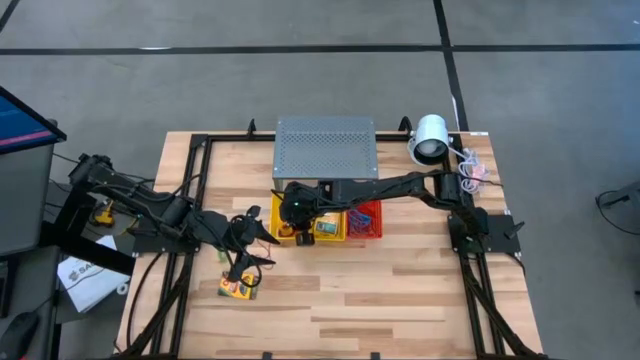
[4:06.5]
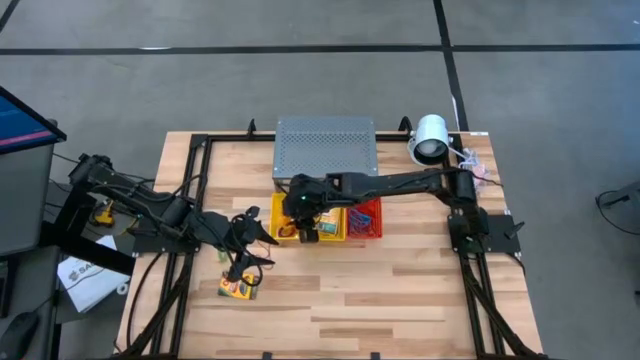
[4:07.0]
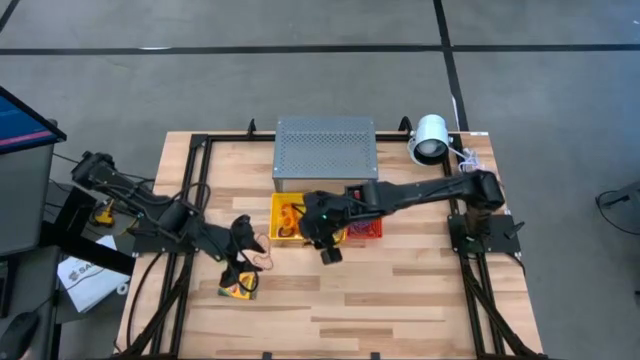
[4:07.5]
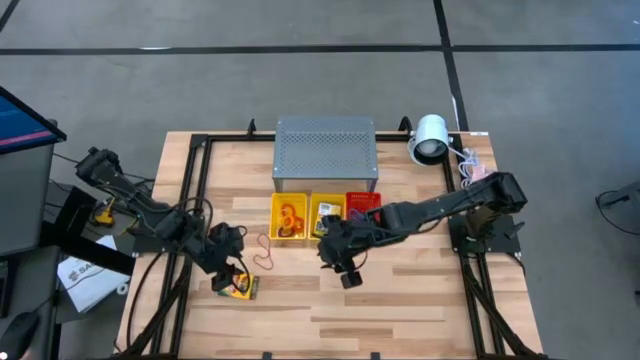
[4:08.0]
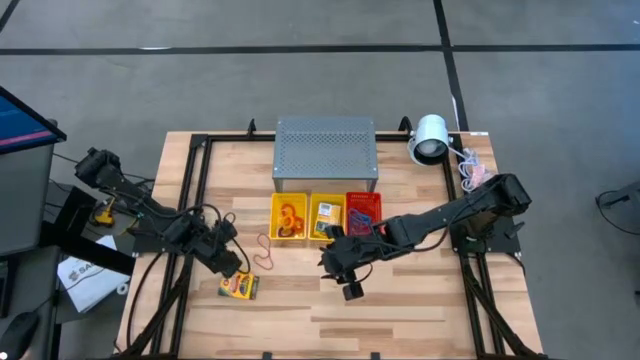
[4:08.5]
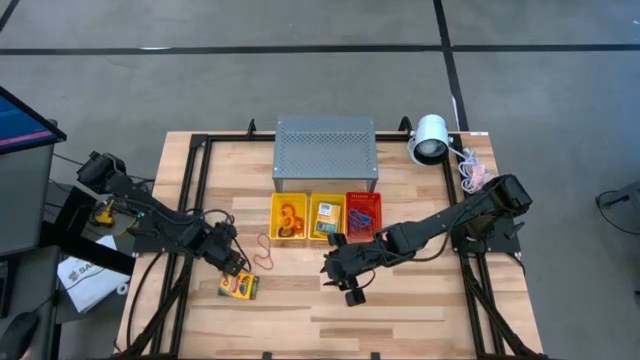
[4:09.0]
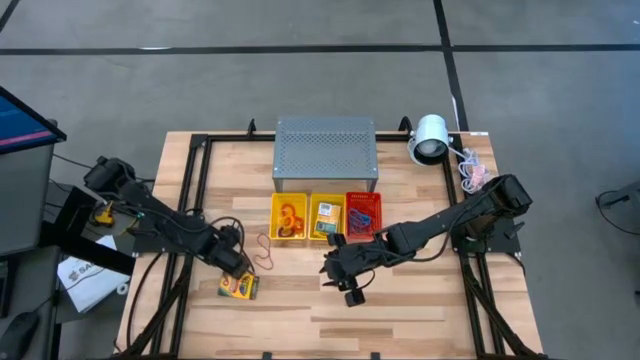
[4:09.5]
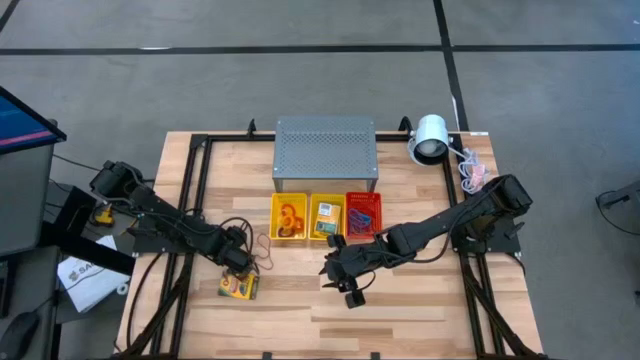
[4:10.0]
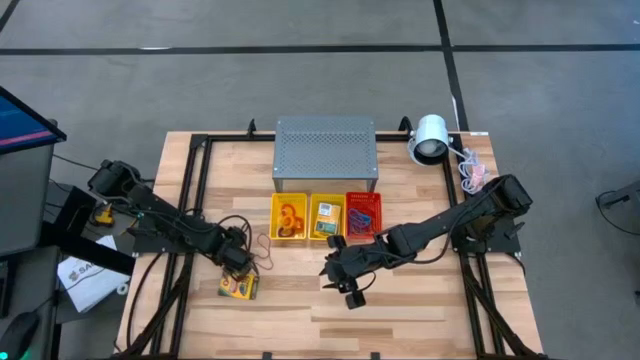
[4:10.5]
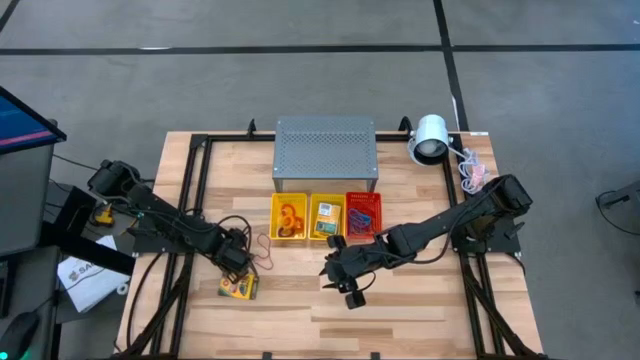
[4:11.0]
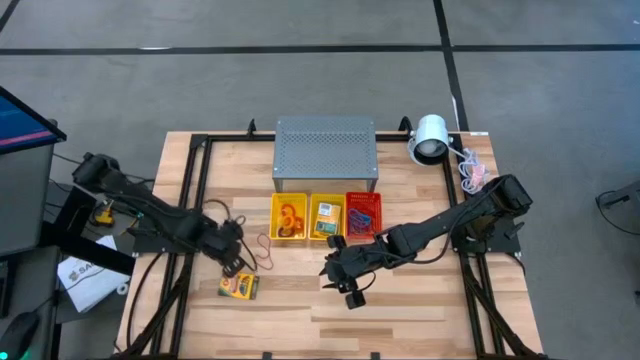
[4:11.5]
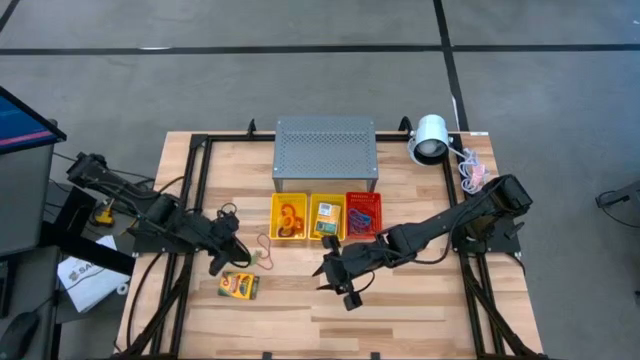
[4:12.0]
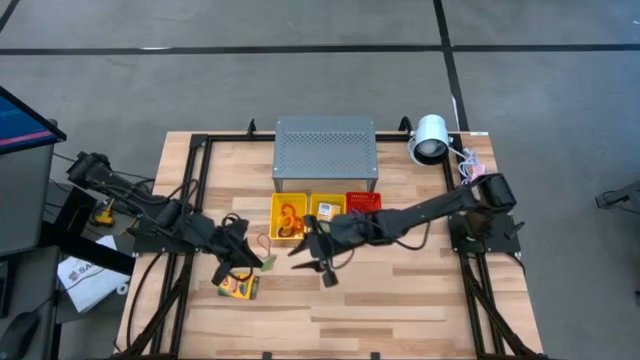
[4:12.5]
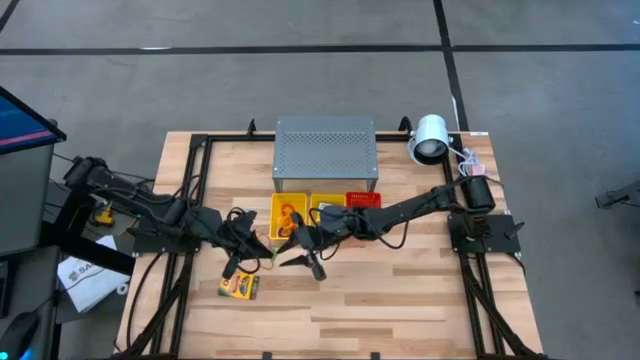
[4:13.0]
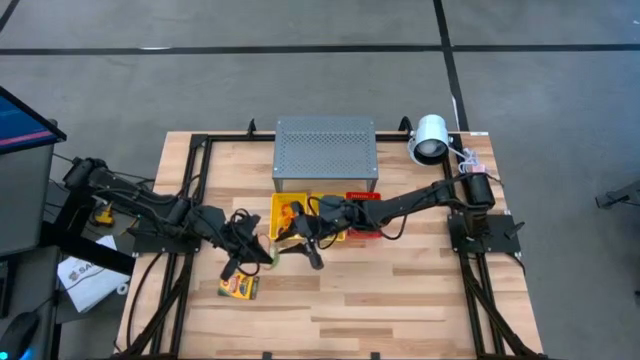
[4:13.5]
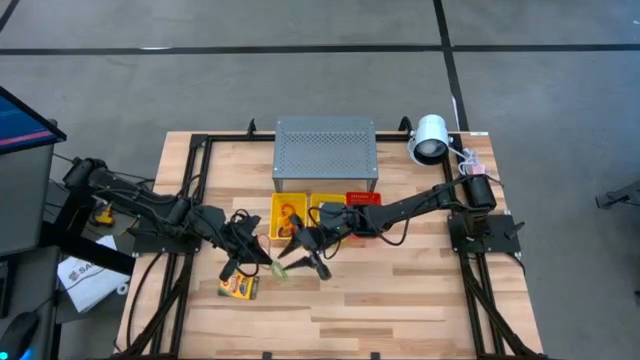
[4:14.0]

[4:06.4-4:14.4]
Task: Pick & Place Office Desk Supplies
Put the green spring keychain into the left yellow bin

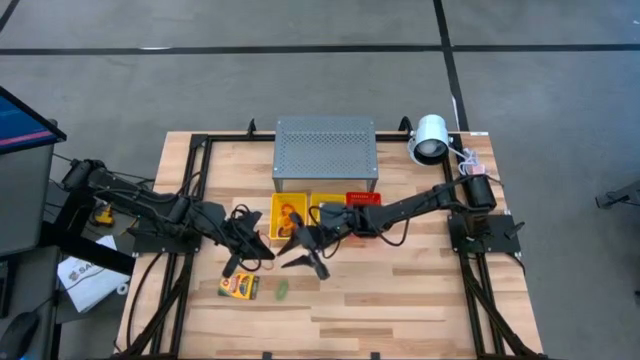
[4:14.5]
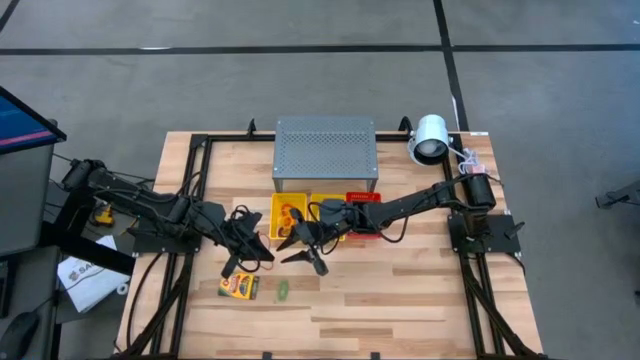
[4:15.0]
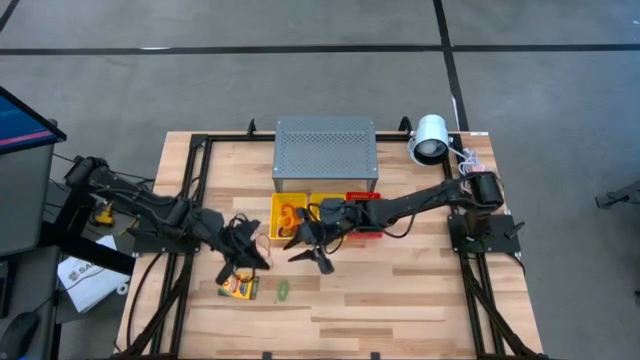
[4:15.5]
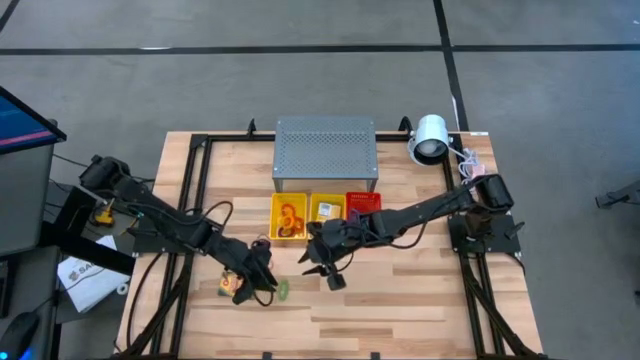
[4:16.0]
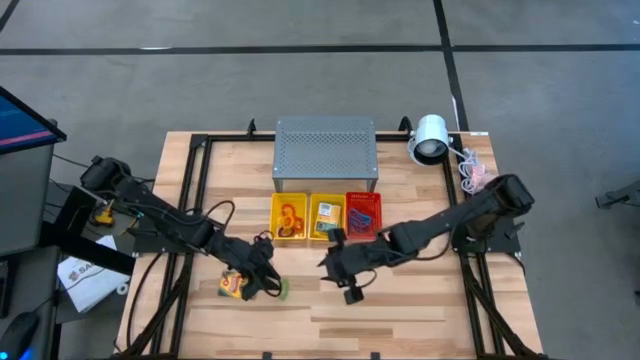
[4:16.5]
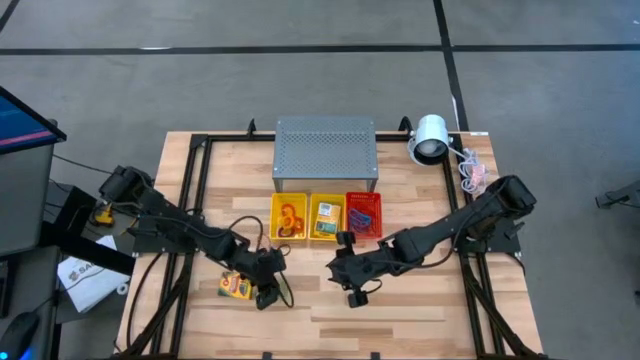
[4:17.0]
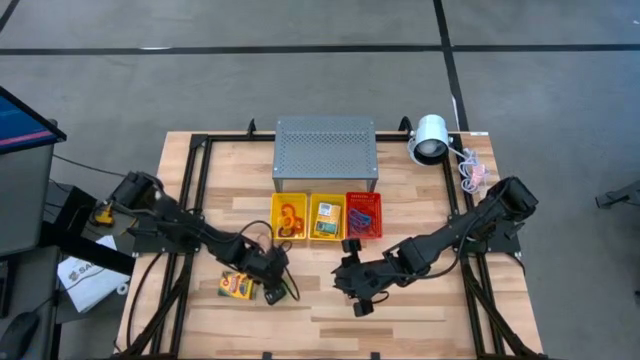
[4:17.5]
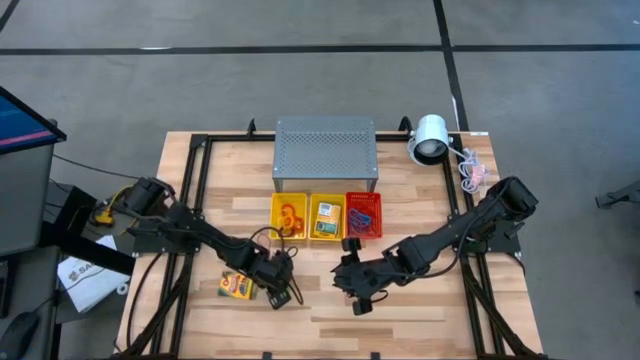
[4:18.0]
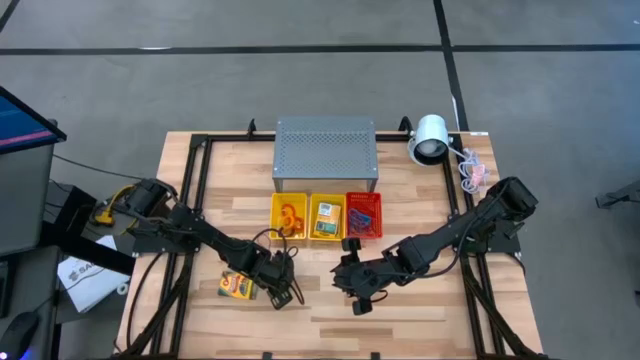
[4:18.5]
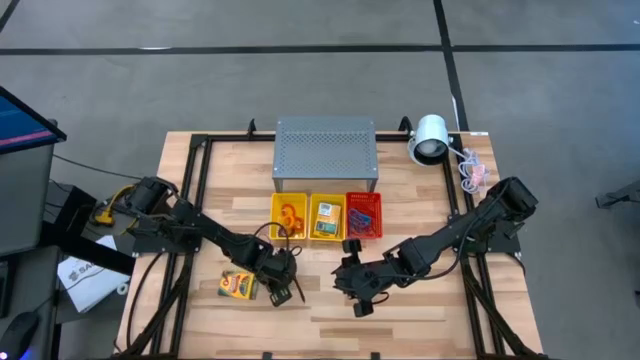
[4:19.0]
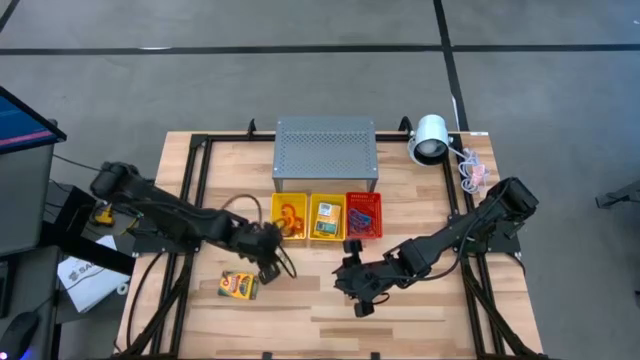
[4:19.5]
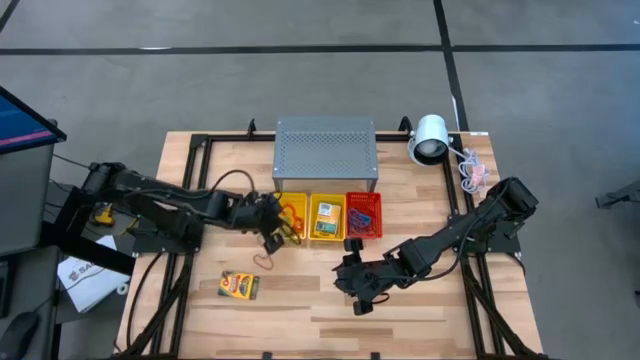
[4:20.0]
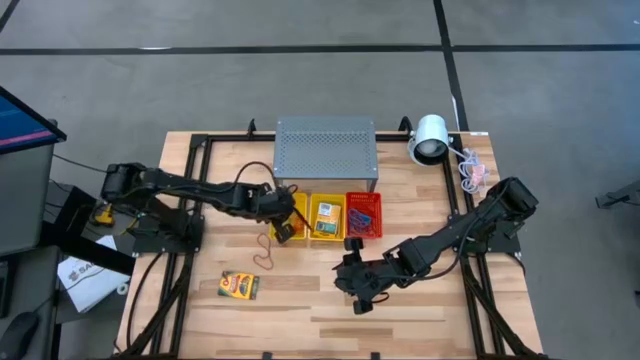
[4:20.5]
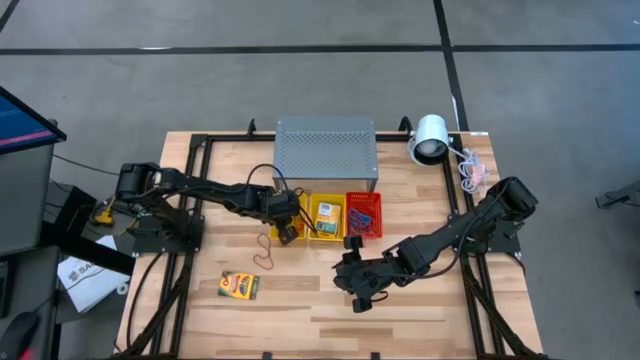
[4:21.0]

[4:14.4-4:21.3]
Put the green spring keychain into the left yellow bin

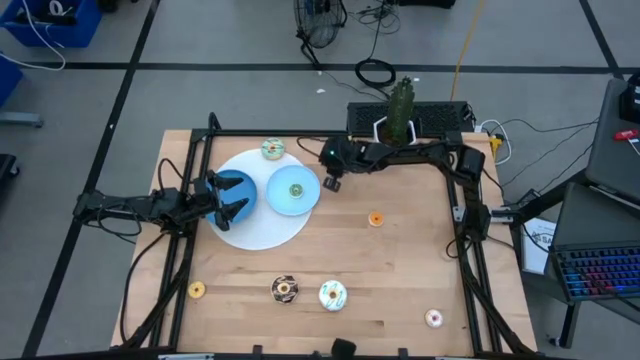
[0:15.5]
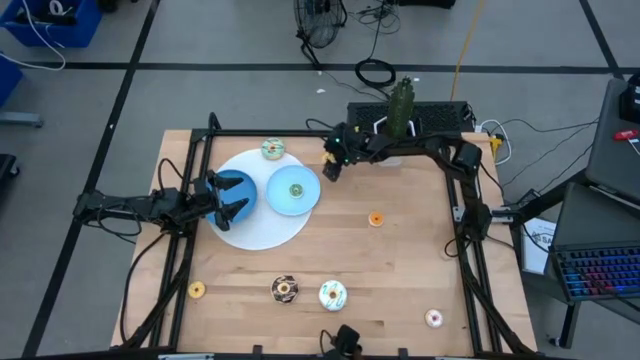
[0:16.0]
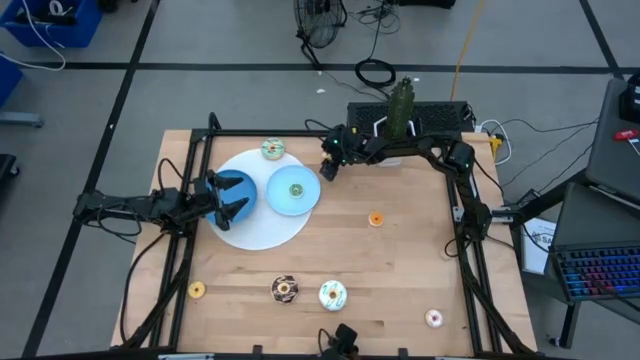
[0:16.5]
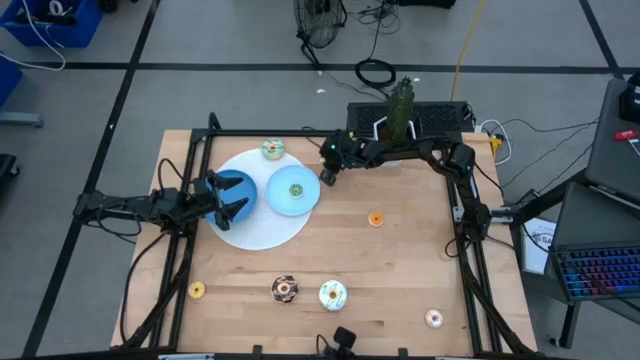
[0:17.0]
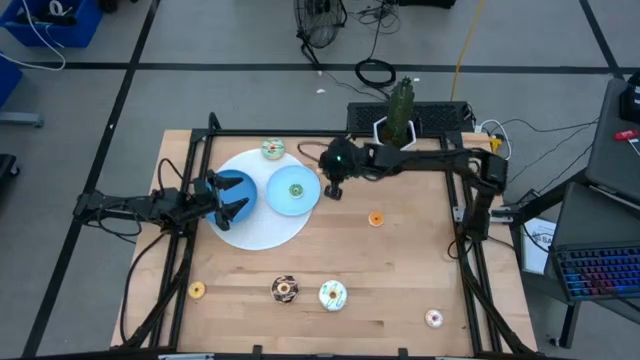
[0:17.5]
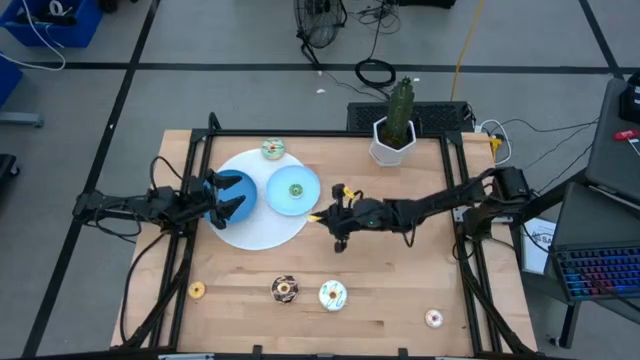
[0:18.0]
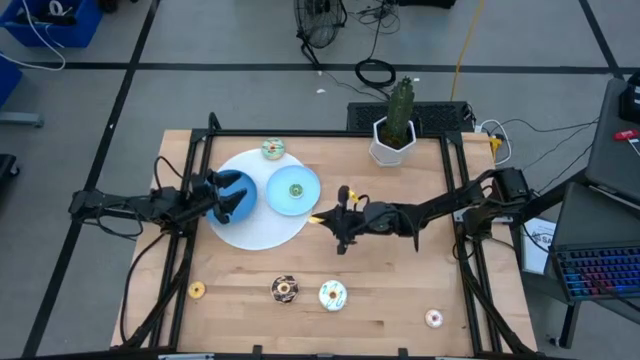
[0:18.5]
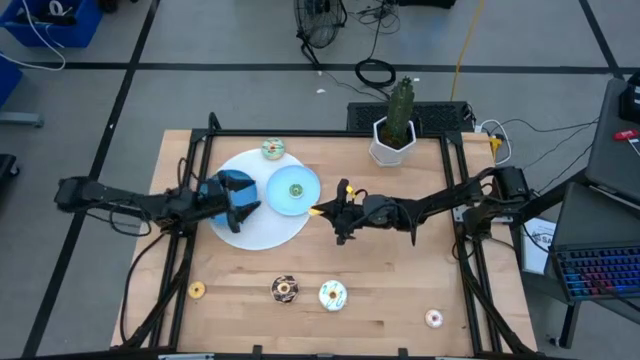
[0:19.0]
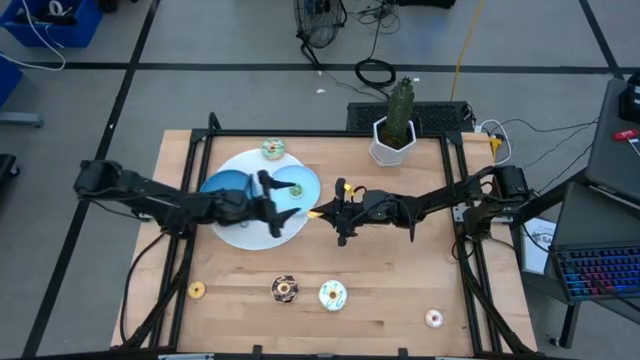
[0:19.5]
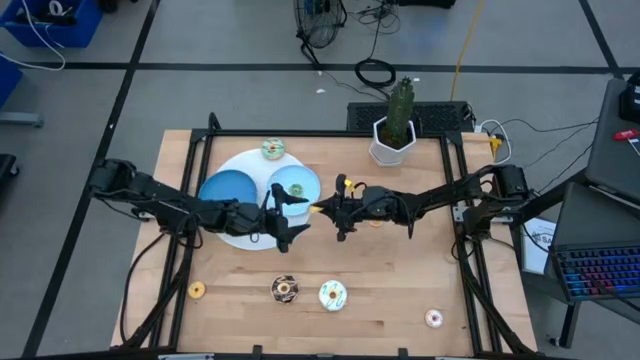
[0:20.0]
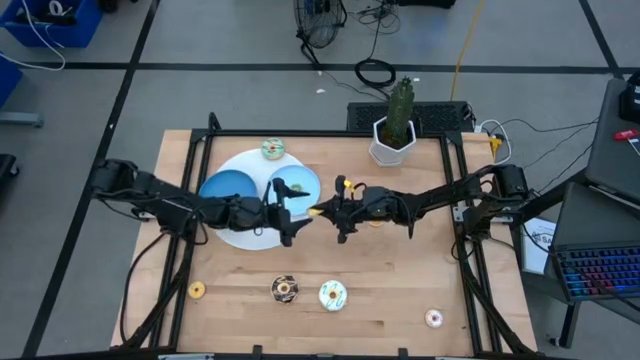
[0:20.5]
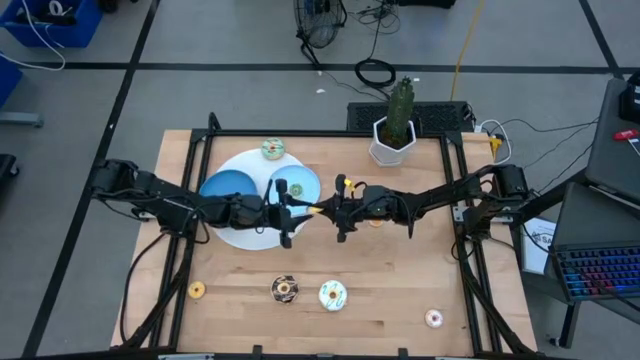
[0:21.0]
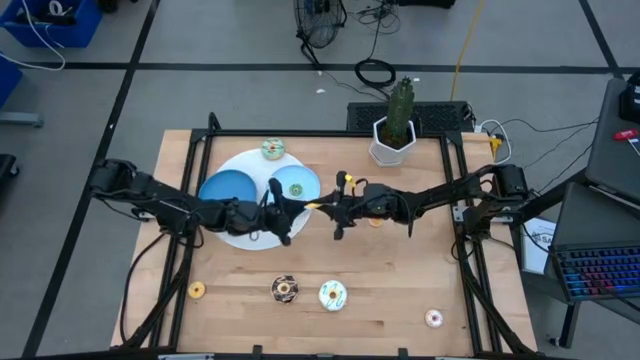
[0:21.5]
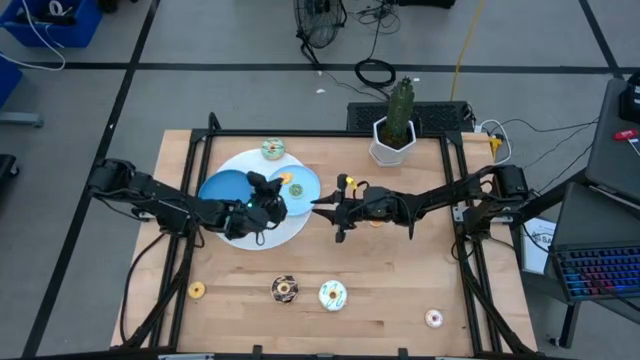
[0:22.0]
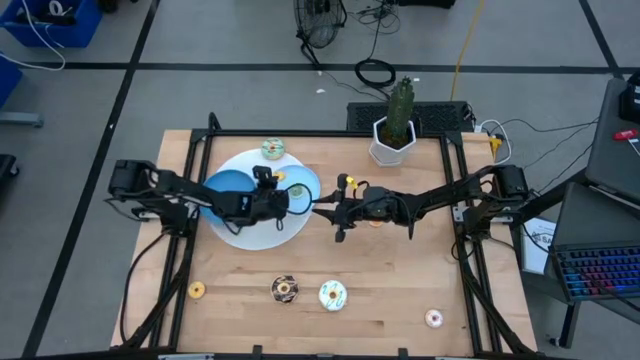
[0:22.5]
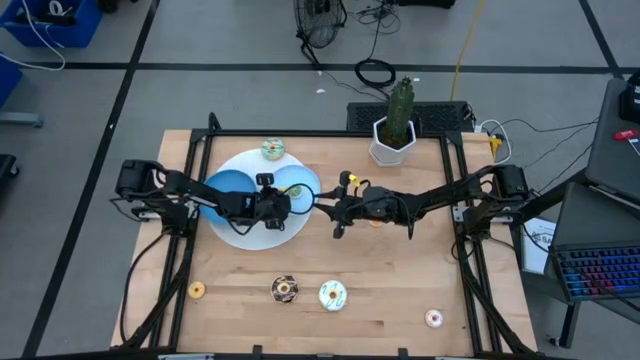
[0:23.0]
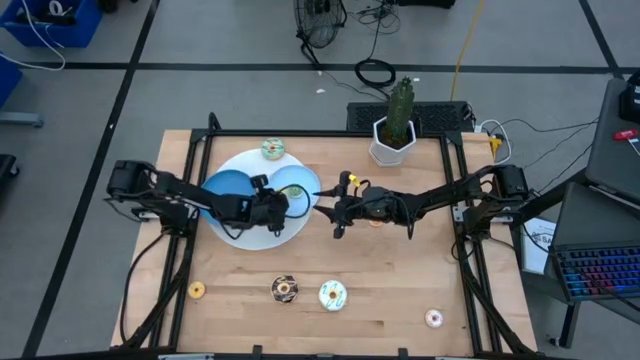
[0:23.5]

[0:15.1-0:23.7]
Task: Pick & Place donuts
Put the small yellow donut on the blue plate
